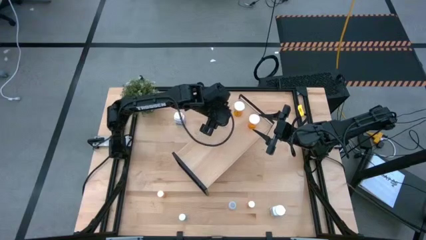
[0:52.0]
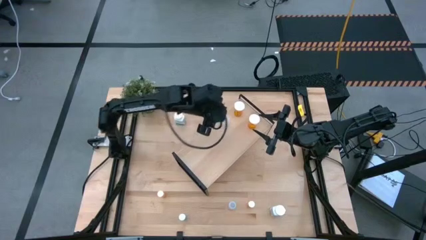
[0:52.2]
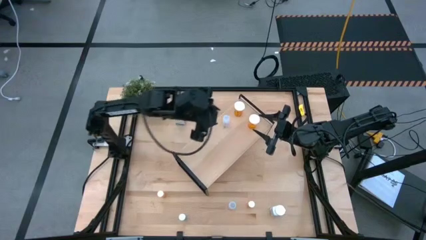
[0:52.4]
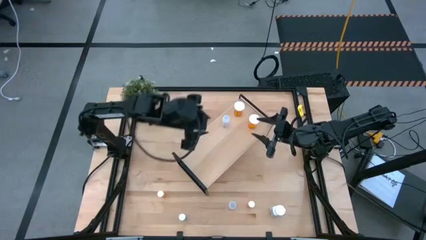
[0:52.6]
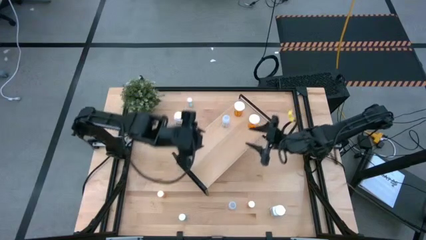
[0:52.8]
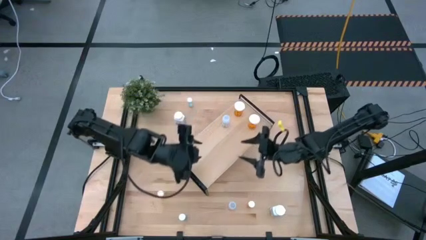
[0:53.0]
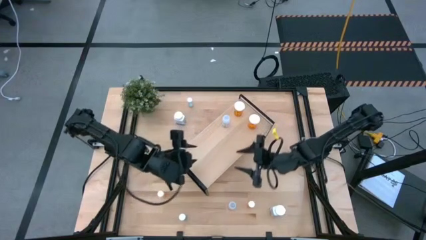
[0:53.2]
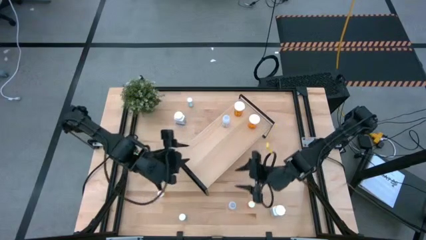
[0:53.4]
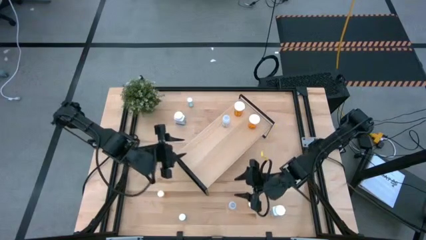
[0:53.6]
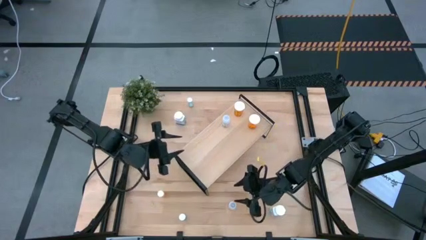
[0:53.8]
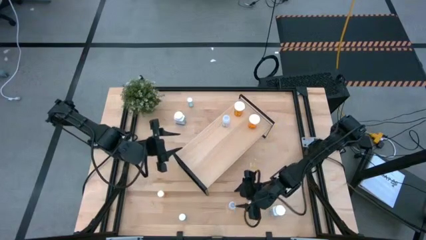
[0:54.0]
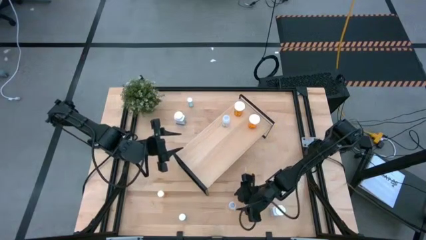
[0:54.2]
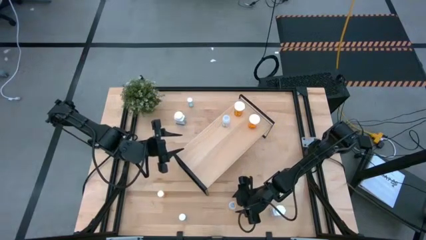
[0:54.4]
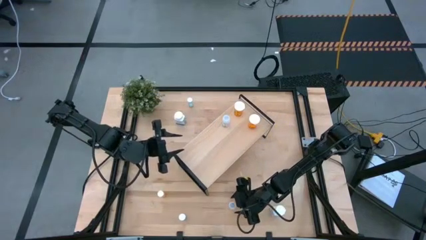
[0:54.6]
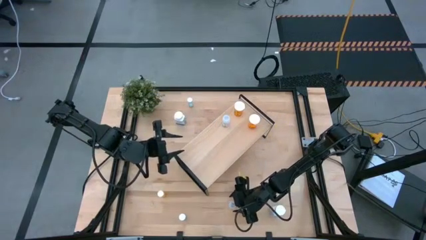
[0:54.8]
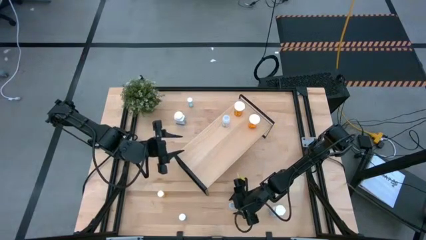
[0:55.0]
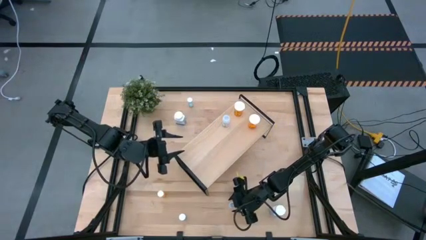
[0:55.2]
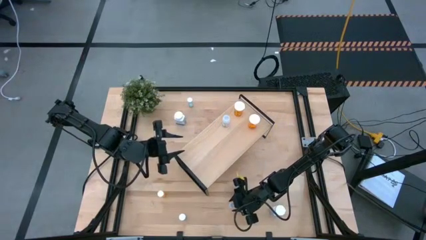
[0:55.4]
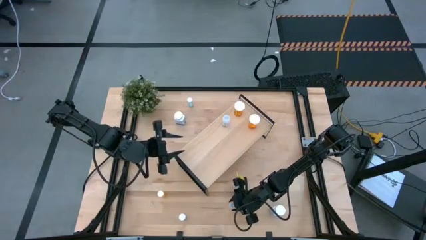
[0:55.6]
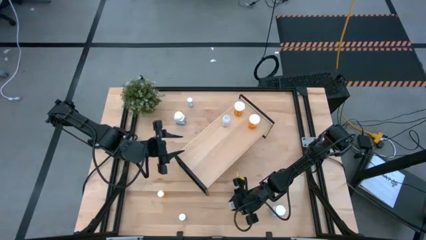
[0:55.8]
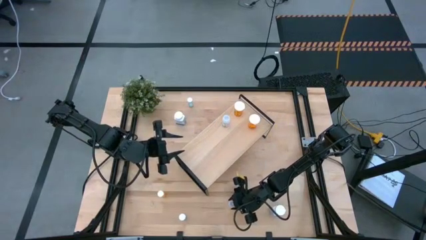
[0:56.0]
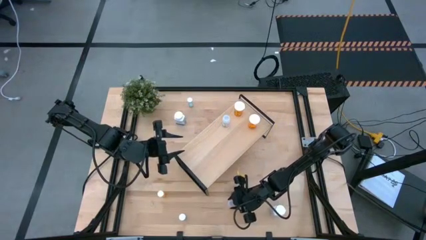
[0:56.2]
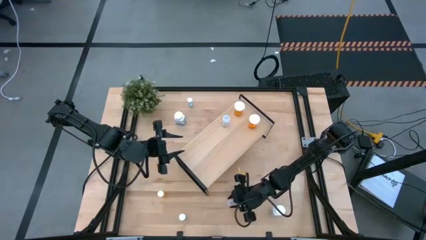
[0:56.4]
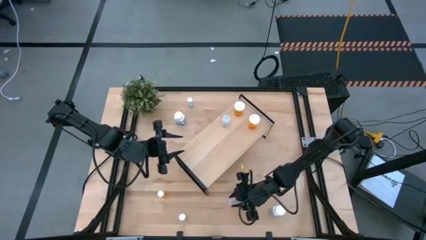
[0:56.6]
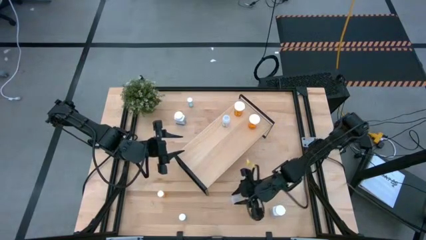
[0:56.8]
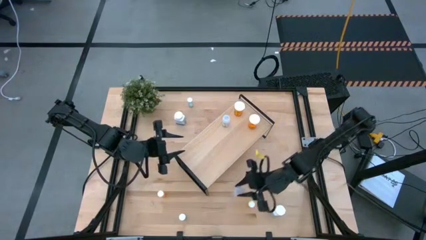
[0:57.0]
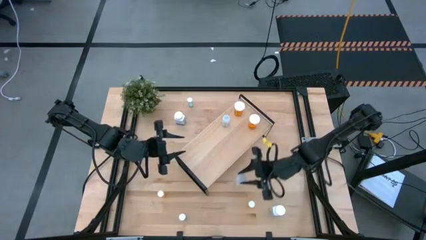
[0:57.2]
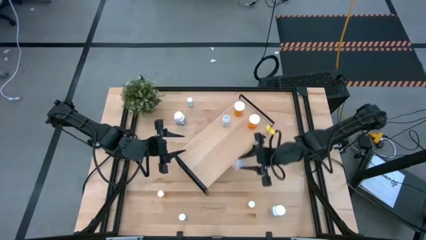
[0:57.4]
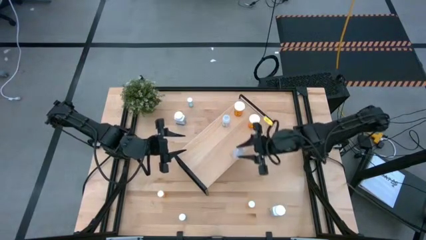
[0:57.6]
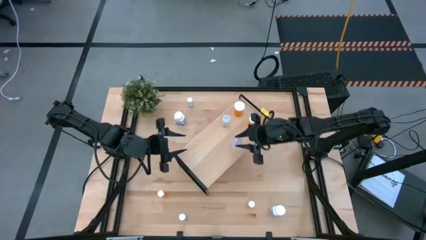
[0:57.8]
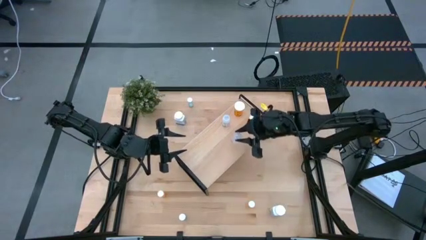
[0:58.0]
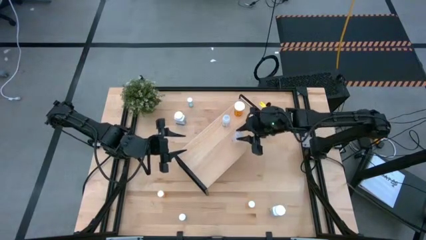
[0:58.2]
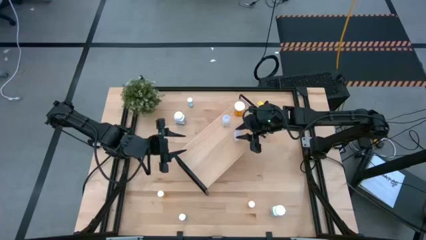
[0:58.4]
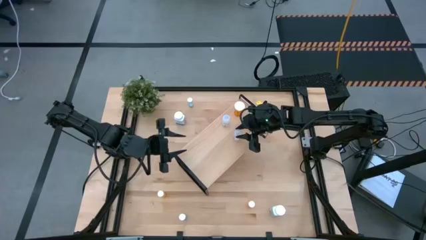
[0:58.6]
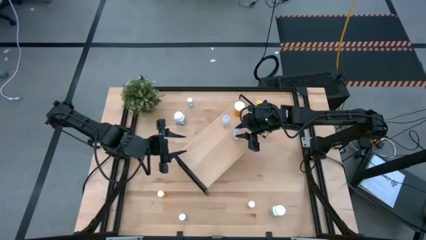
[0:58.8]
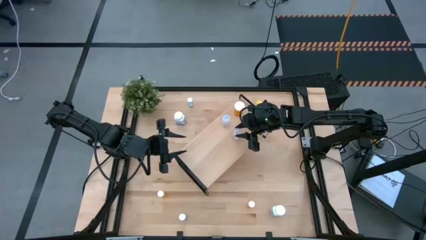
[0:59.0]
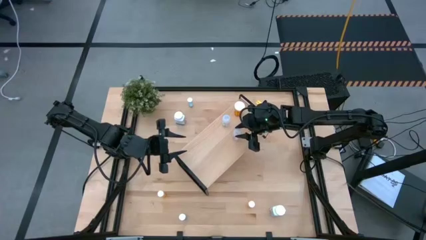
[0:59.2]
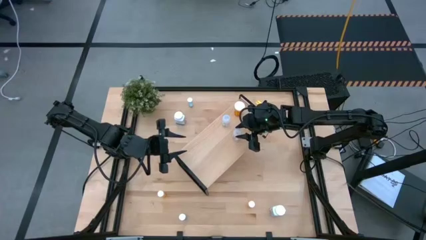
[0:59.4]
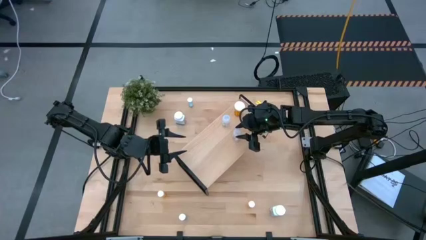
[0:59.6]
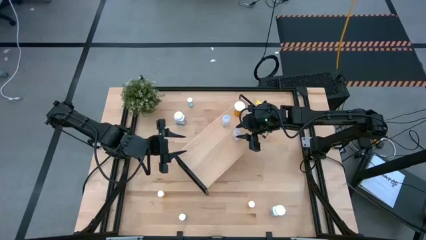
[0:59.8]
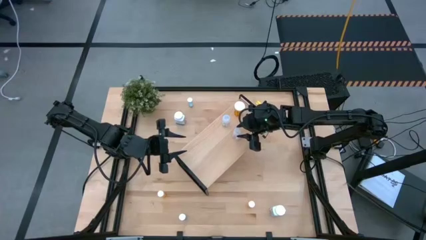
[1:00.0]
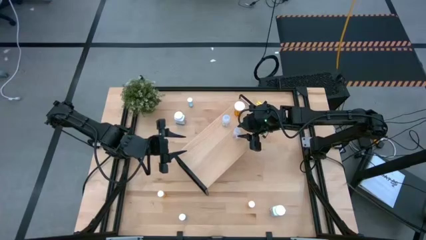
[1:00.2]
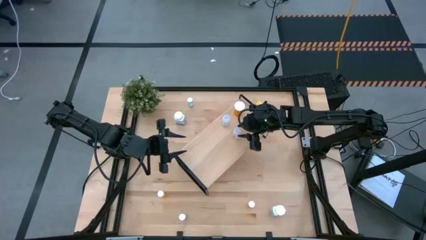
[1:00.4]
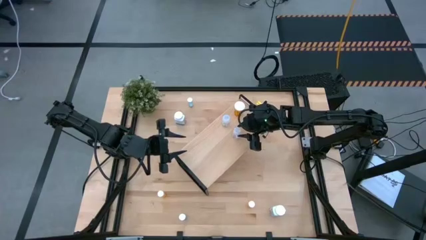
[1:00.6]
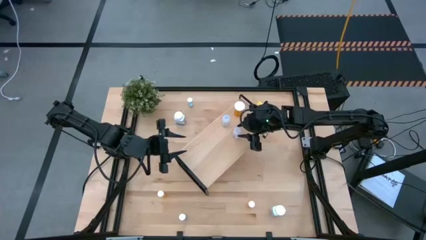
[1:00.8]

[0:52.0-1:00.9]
Task: Pick and place medicine bottles onto shelf by color
Put the transparent pill bottle on the shelf aligned with the other transparent pill bottle

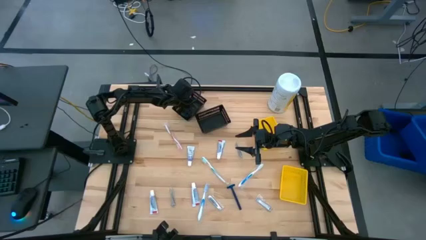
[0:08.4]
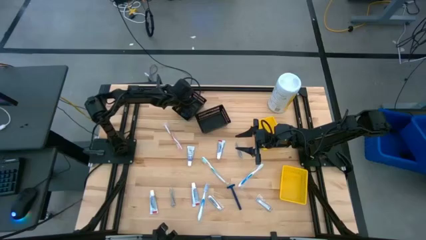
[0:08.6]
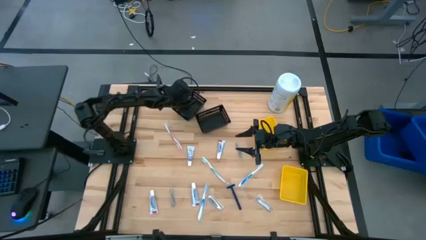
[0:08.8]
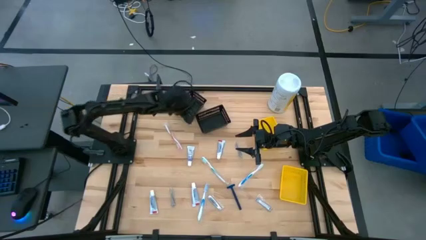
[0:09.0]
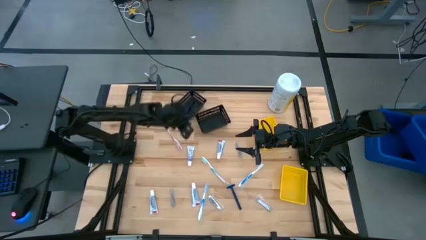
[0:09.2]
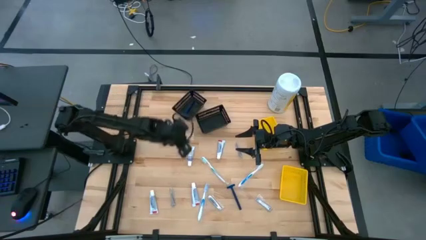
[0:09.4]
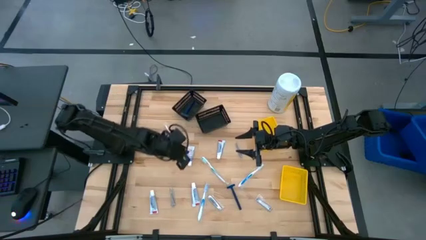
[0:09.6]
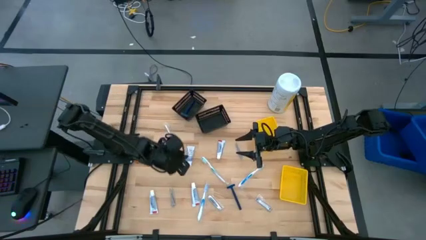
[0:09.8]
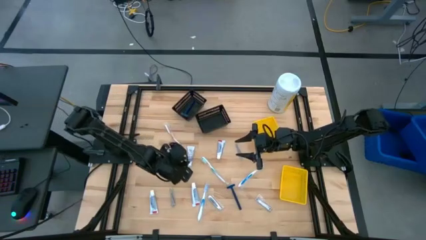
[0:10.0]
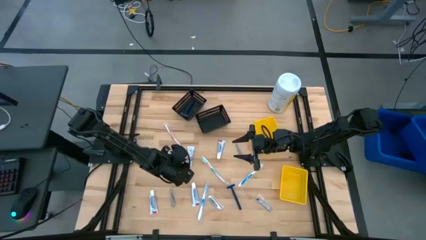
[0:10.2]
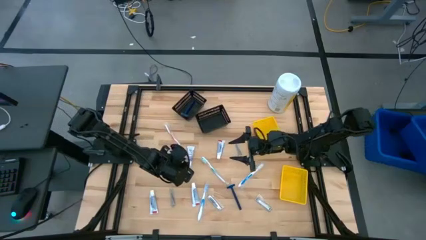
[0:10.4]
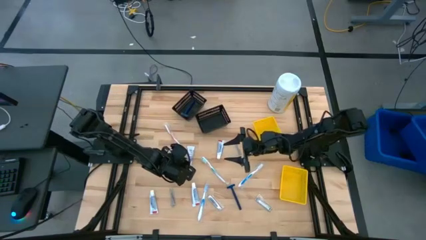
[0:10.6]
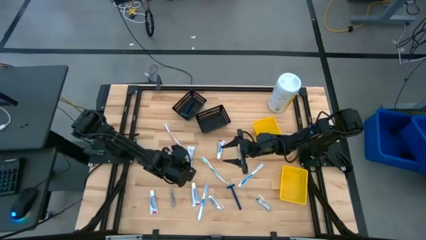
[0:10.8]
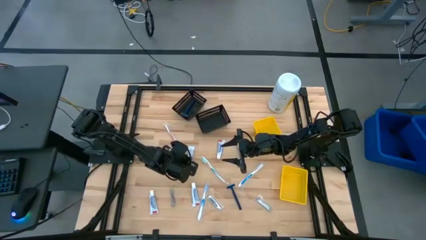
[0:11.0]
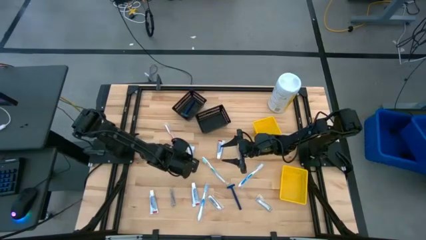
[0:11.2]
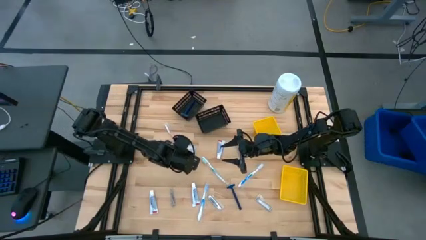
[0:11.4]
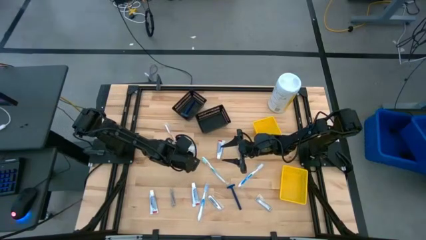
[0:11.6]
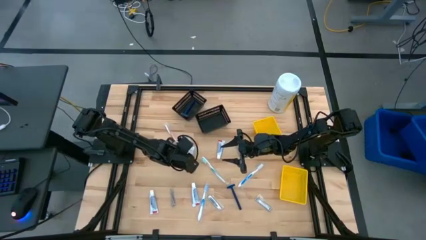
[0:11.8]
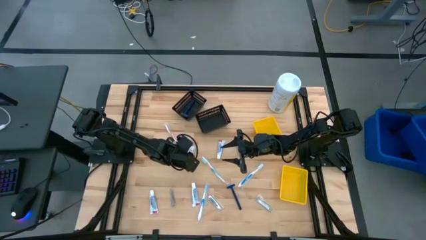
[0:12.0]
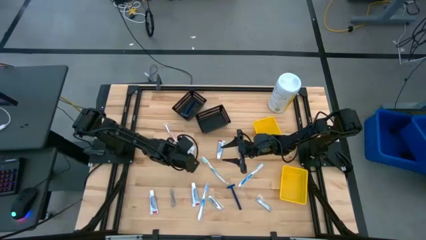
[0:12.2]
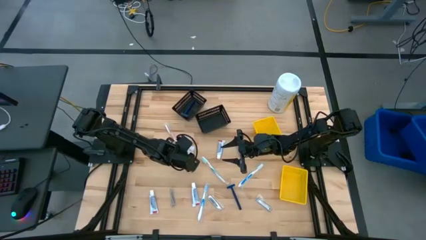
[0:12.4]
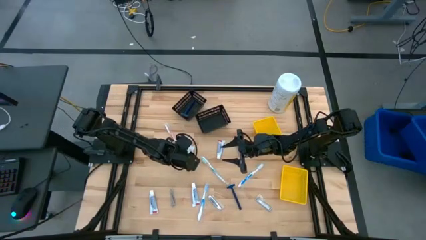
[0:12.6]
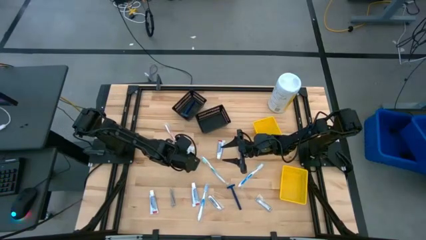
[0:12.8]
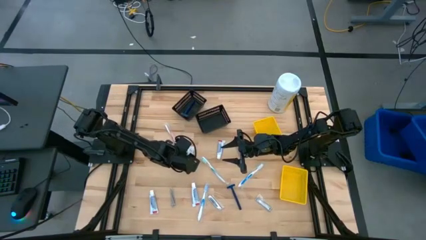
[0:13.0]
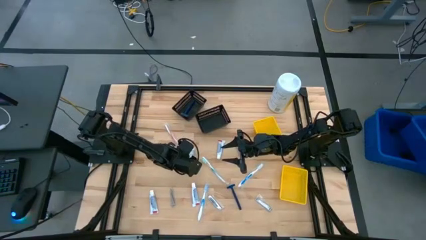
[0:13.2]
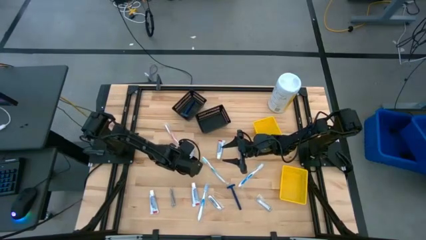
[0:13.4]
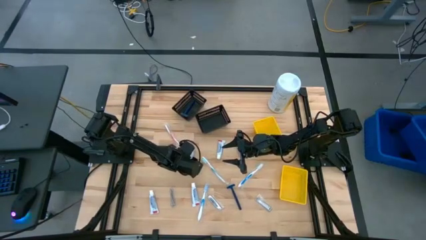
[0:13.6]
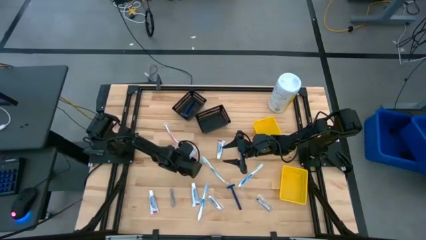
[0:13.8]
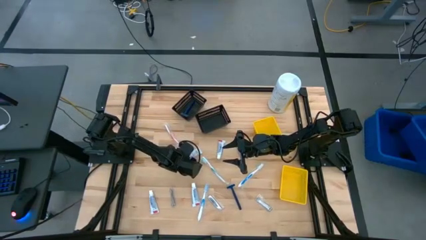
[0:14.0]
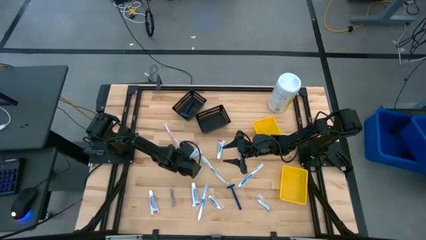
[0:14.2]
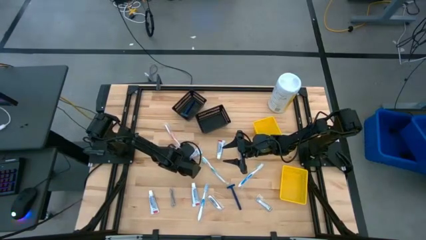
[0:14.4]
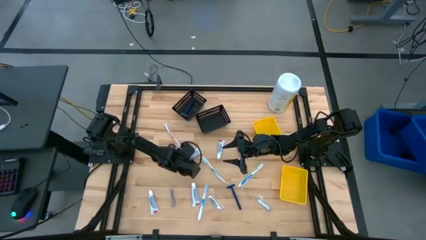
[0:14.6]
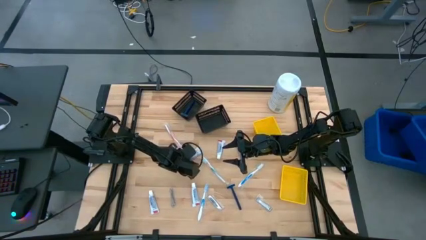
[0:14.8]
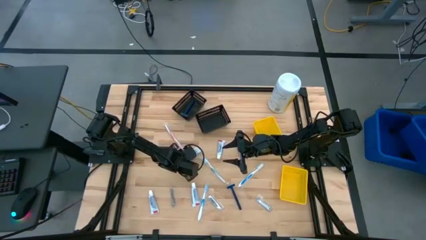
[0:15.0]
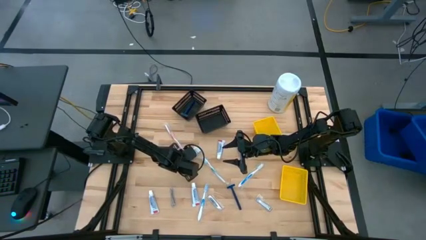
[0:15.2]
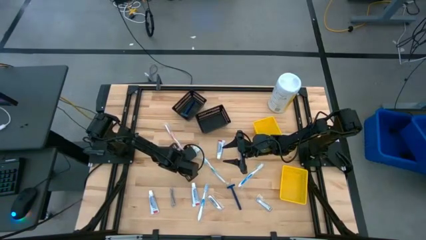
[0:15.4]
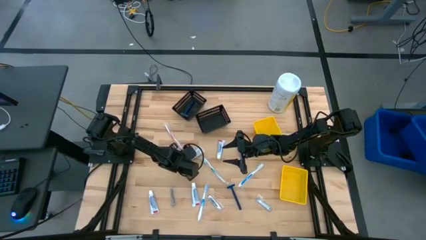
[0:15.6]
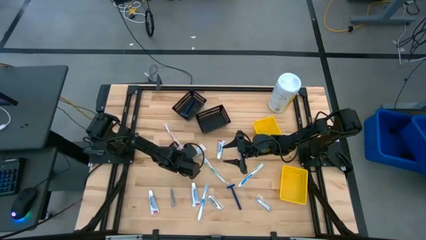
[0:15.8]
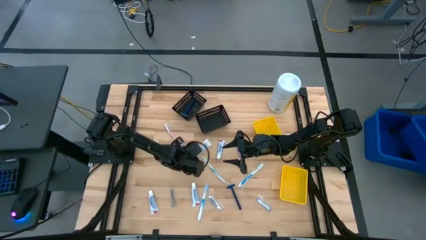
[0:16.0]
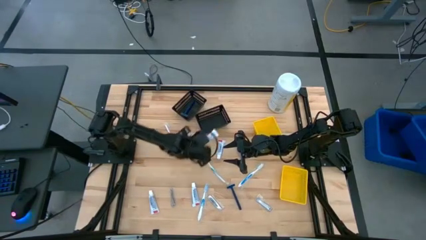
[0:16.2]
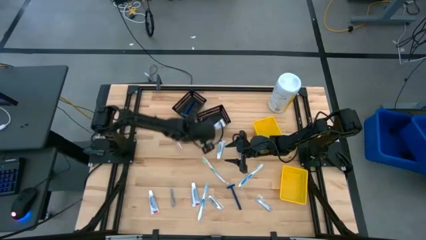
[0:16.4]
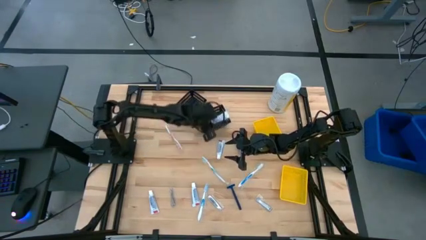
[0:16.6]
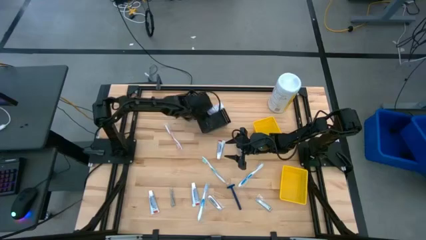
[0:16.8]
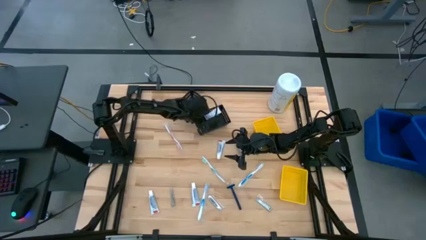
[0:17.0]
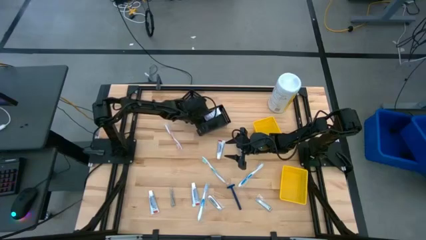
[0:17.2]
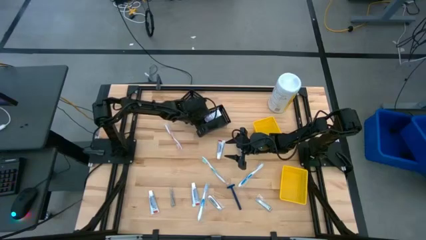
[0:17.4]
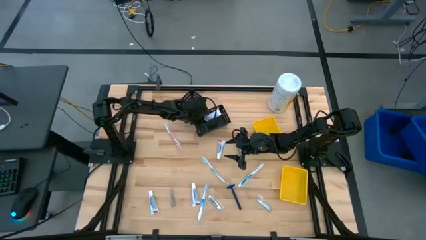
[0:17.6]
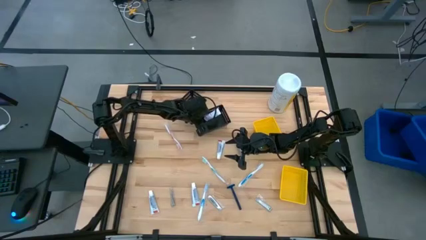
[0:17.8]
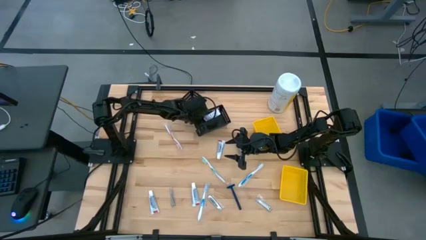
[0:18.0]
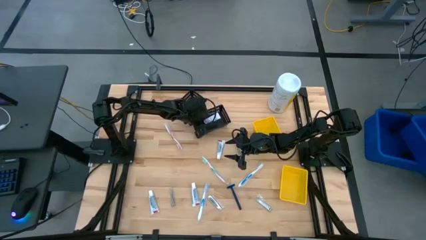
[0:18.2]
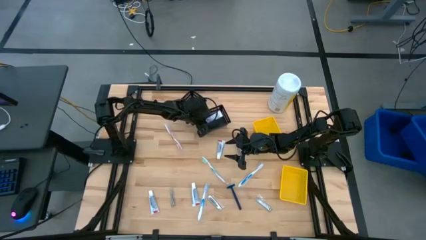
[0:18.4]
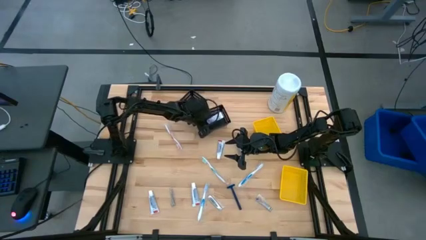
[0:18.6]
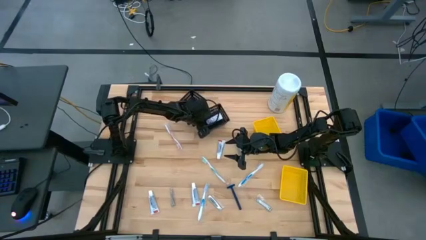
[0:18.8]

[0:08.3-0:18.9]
Task: Pick & Place Travel size toiletries
Put the toothpaste into the bottom black bin
